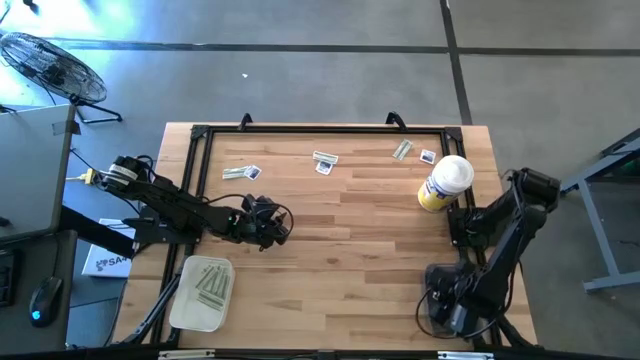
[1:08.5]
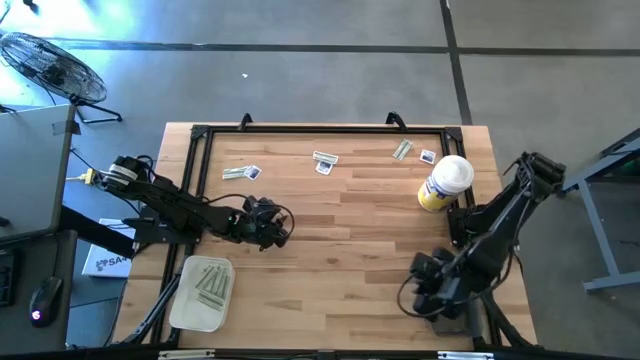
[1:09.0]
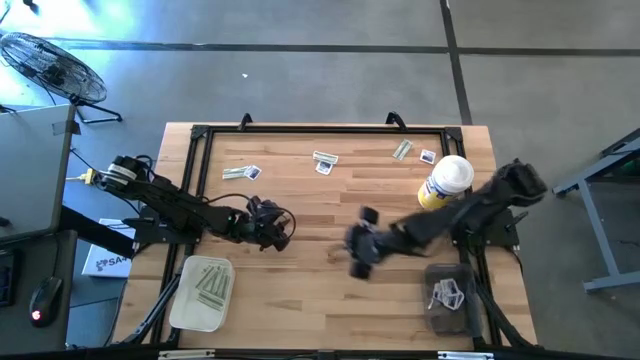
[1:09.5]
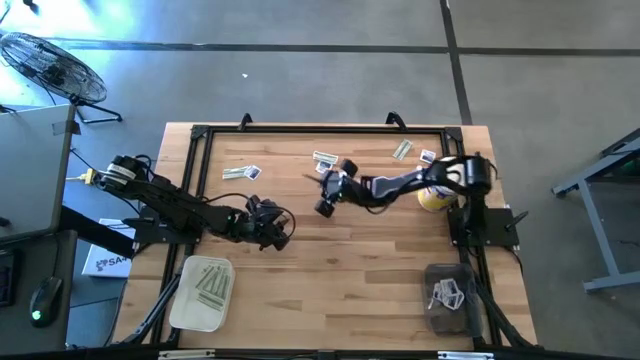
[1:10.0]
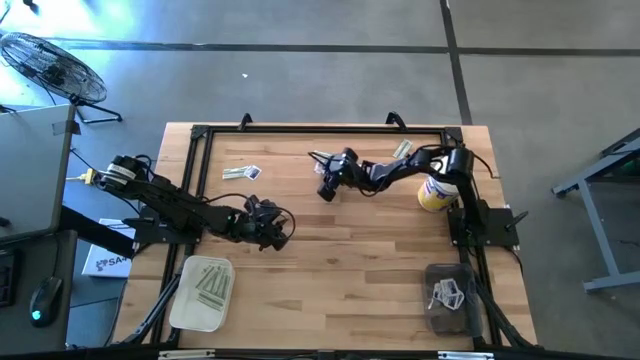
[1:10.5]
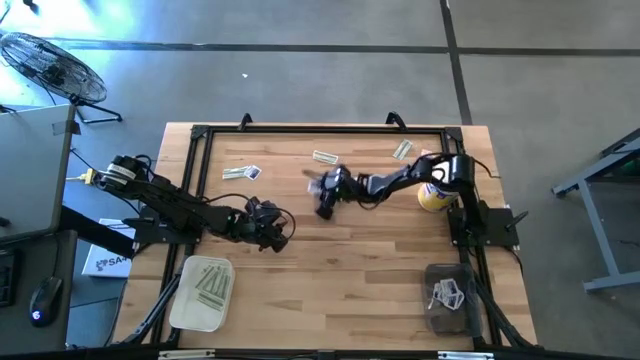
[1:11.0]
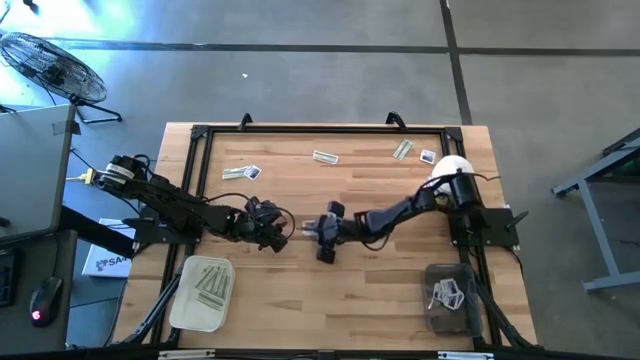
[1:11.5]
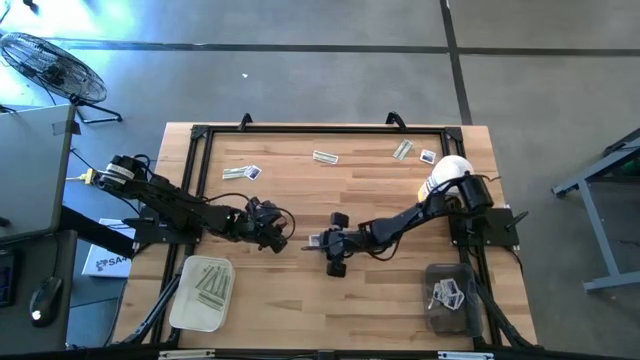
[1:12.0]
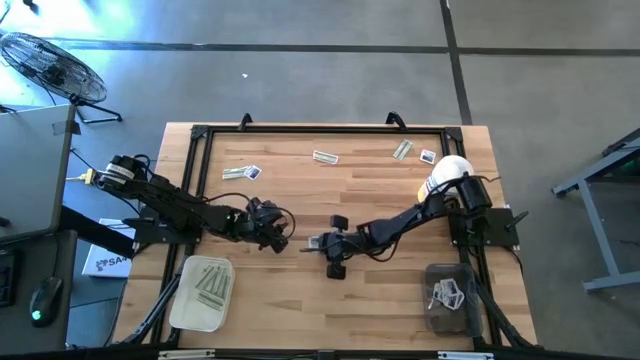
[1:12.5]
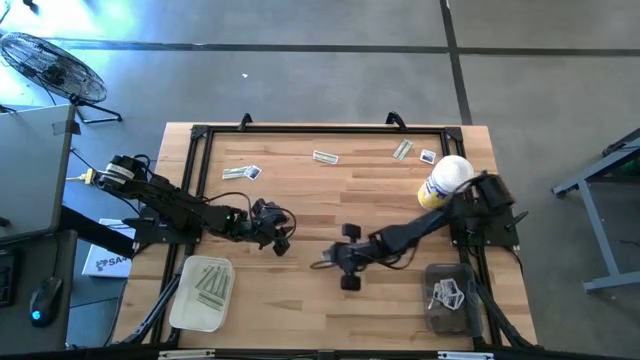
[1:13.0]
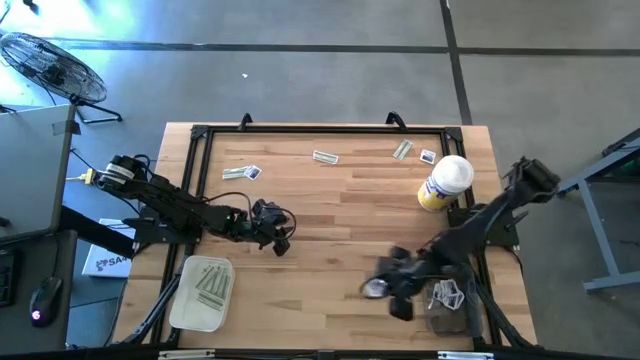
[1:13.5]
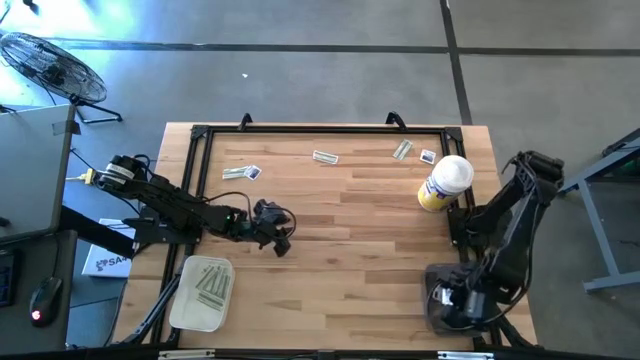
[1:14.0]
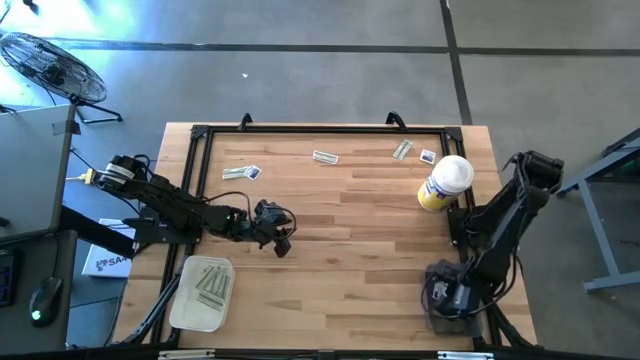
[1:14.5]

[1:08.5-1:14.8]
Task: Pick & Place First Aid Supplies
Put the blue alcohol pad into the black bin

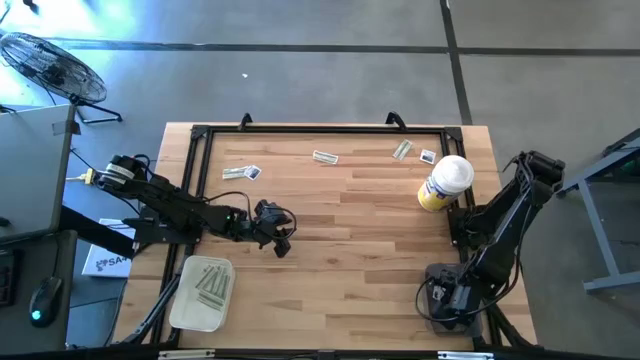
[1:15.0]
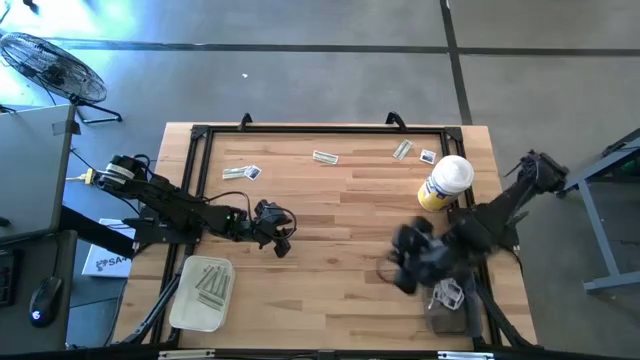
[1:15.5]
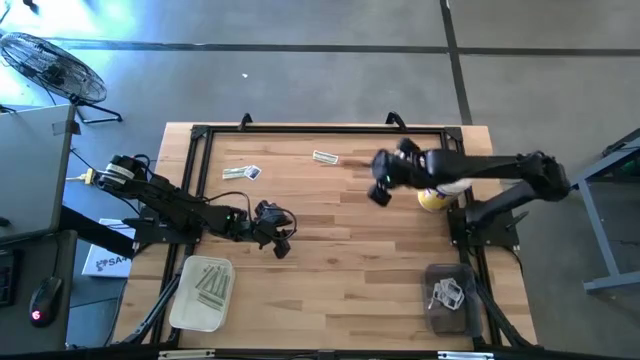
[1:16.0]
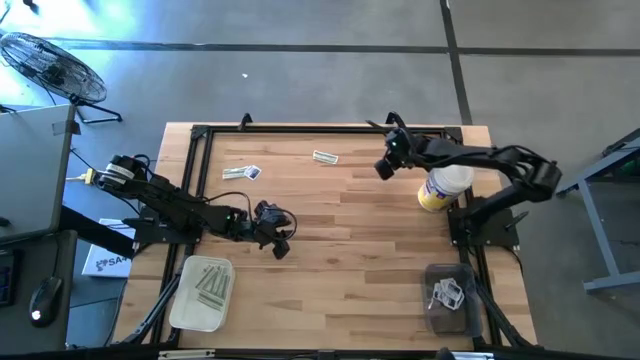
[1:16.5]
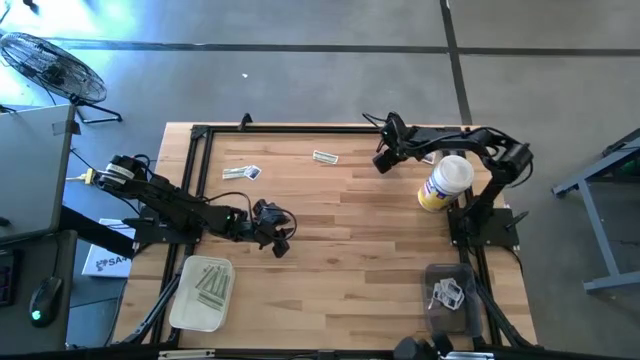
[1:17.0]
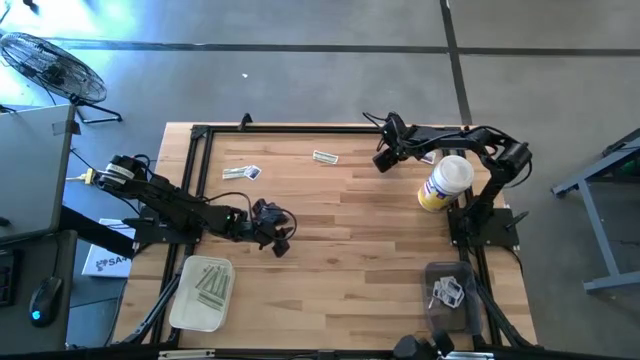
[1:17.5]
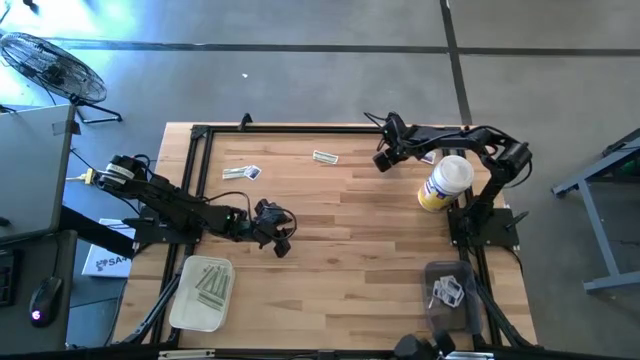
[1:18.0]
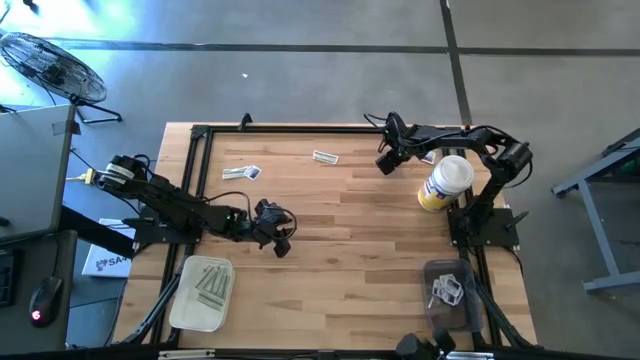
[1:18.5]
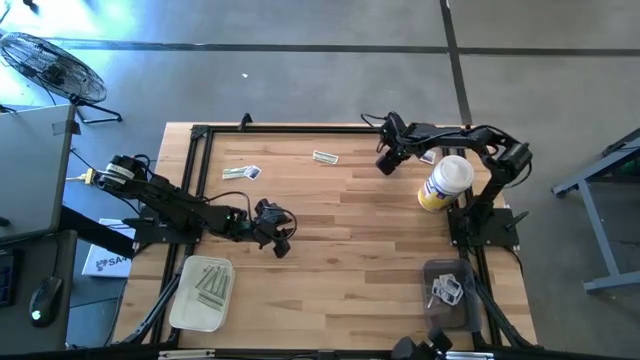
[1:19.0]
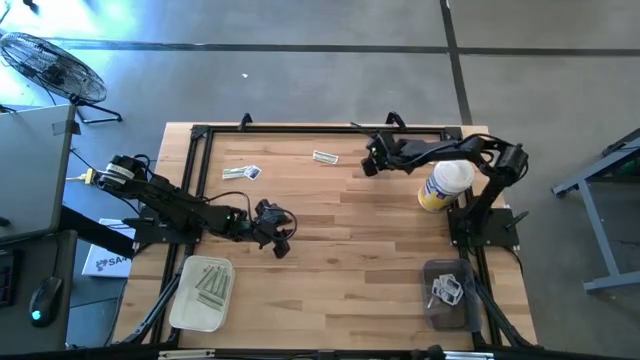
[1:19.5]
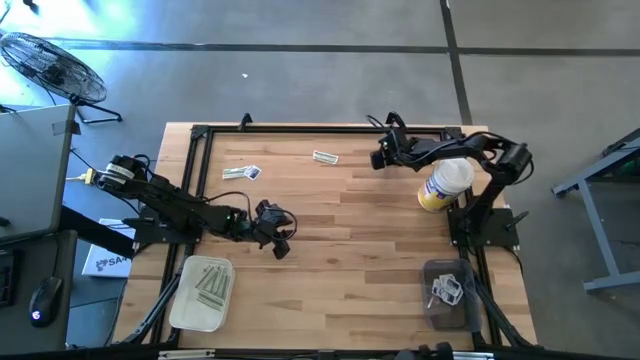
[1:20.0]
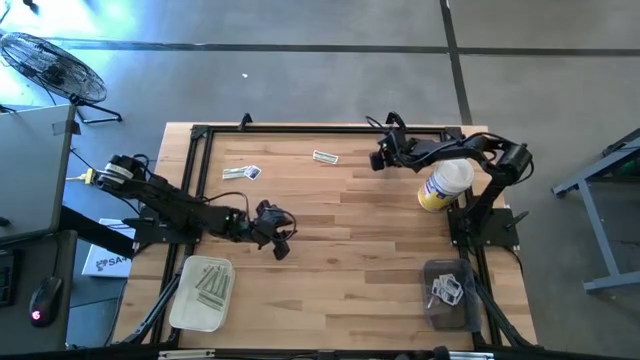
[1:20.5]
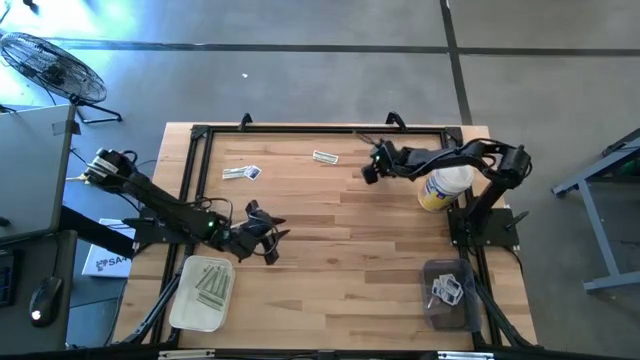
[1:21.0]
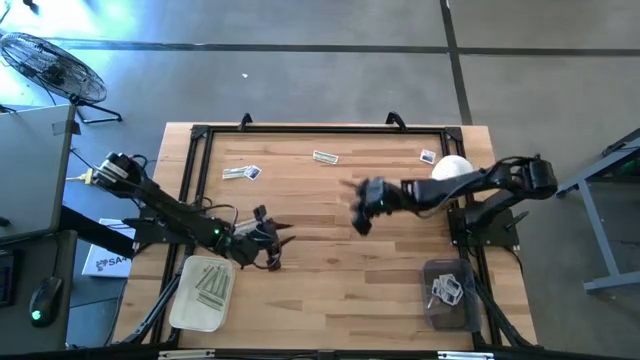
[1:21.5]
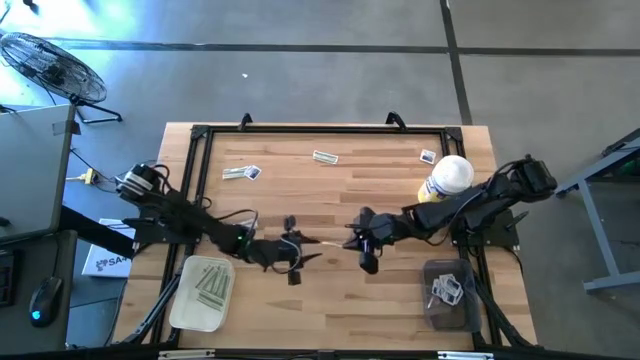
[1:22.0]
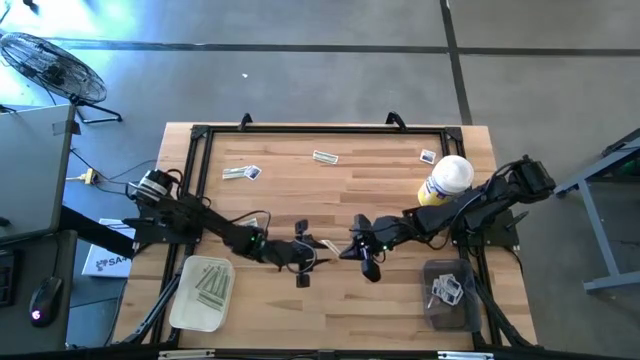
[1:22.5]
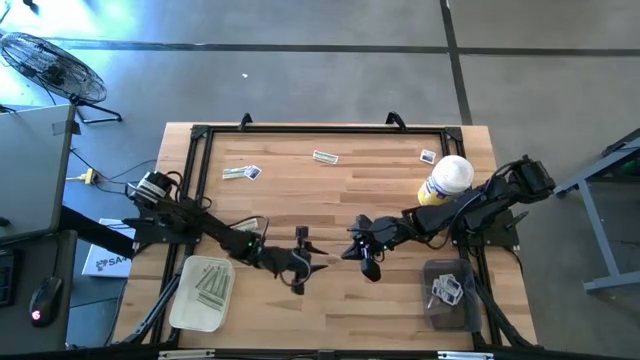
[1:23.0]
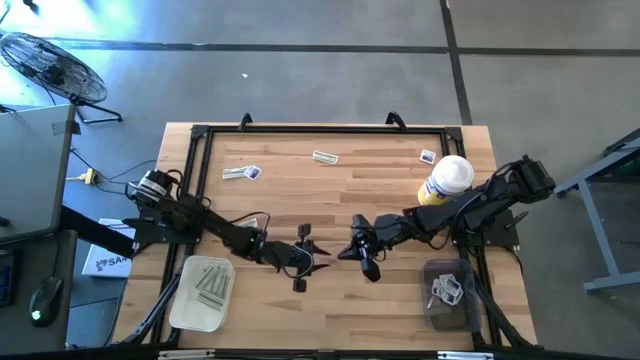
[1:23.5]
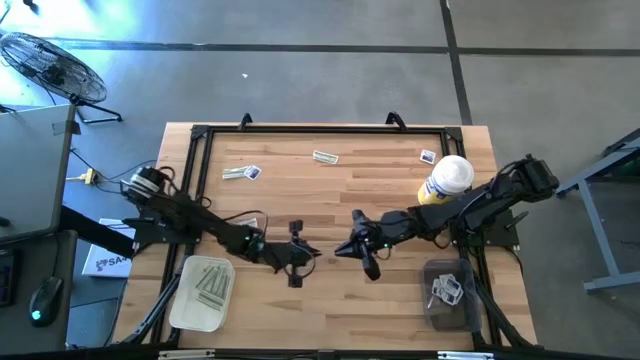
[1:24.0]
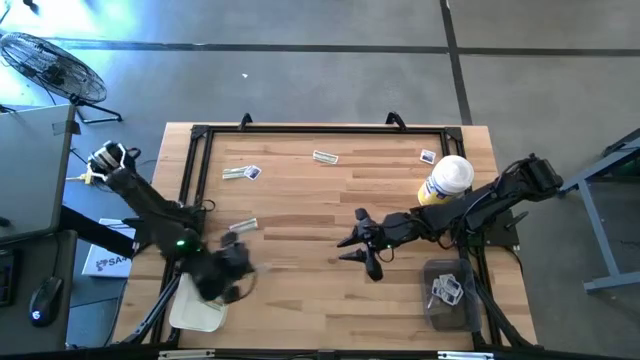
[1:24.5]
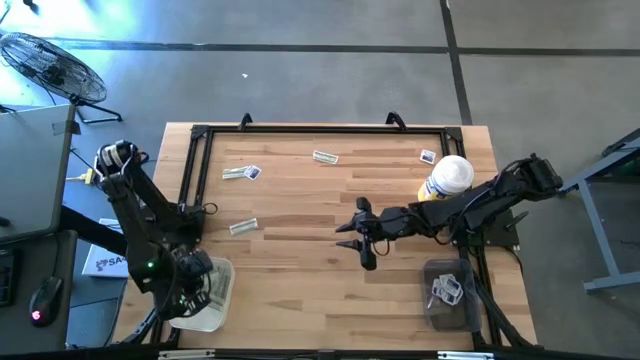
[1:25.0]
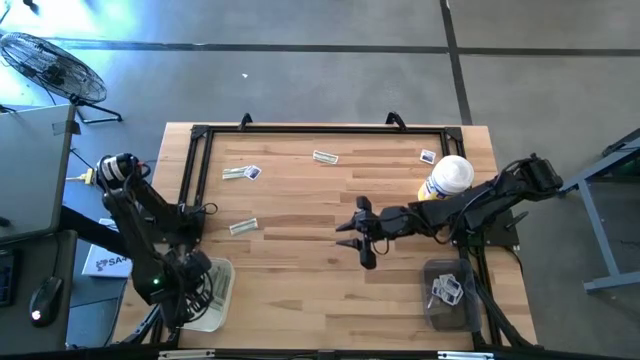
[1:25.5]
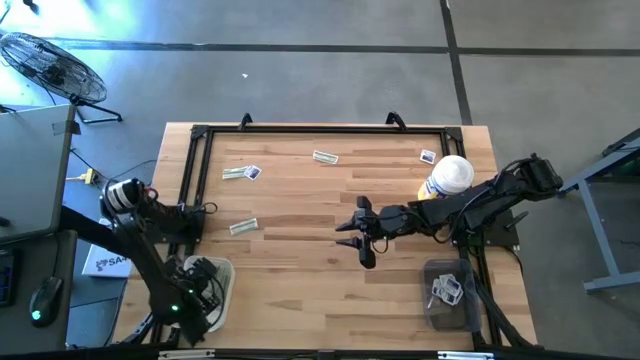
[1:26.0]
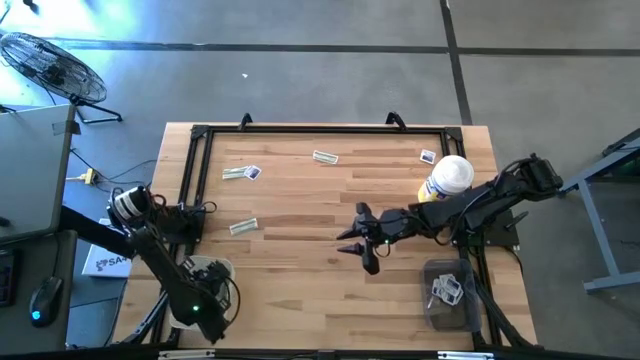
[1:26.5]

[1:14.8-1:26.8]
Put the green bandage into the white bin

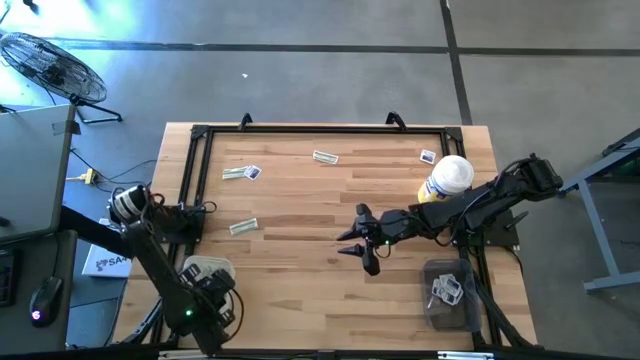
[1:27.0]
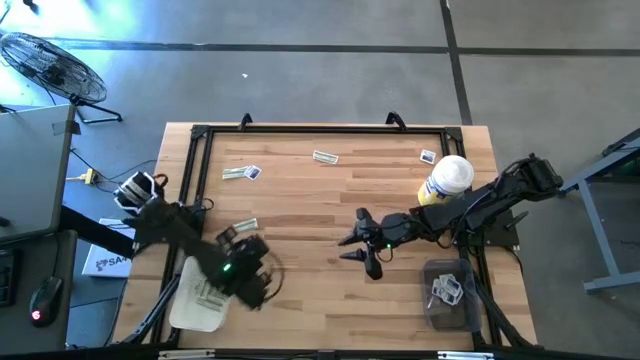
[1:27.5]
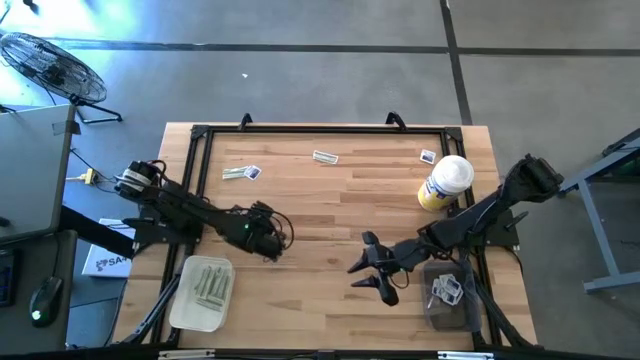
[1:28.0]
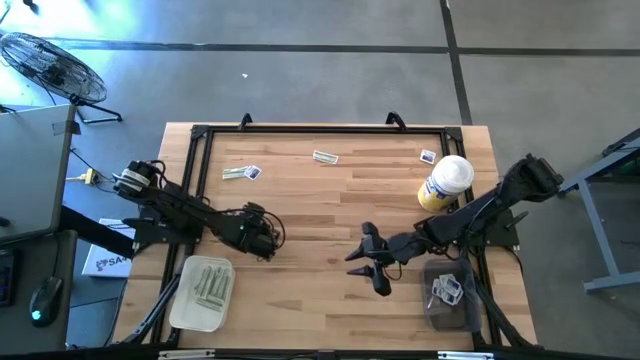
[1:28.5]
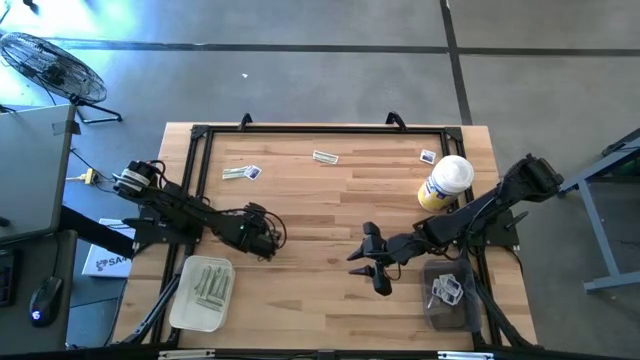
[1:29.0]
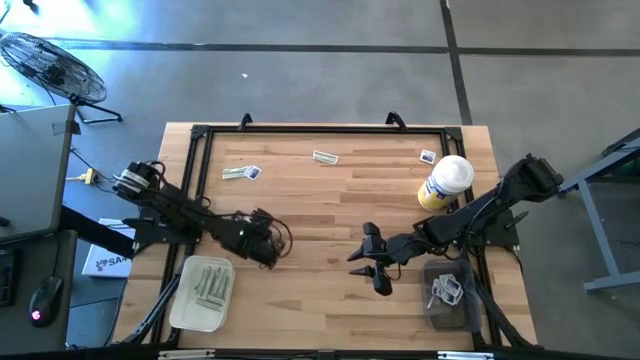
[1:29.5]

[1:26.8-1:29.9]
Put the green bandage into the white bin
